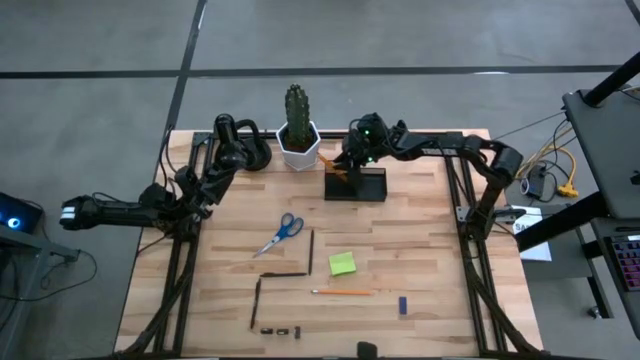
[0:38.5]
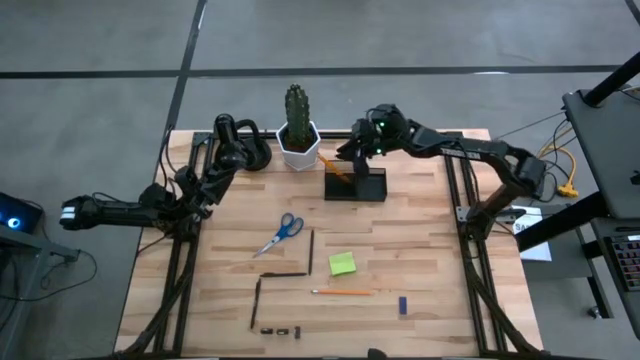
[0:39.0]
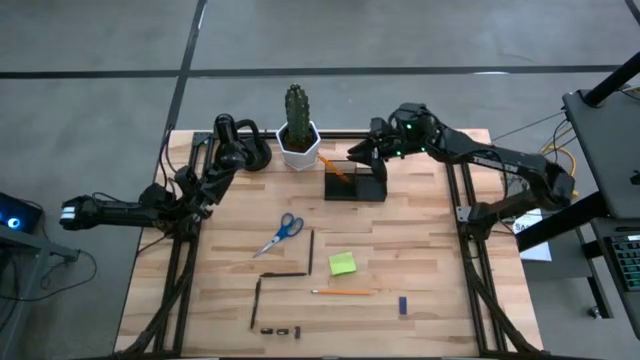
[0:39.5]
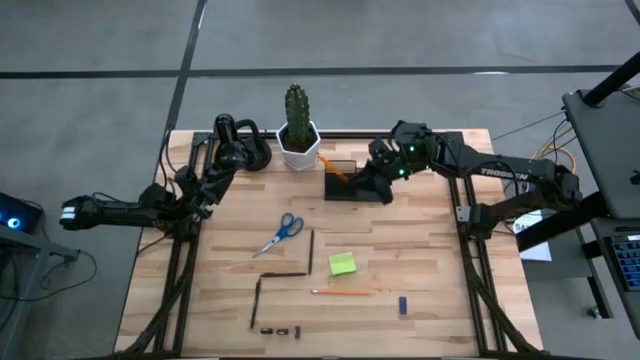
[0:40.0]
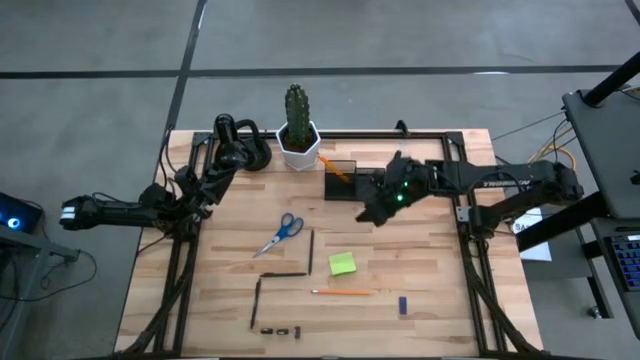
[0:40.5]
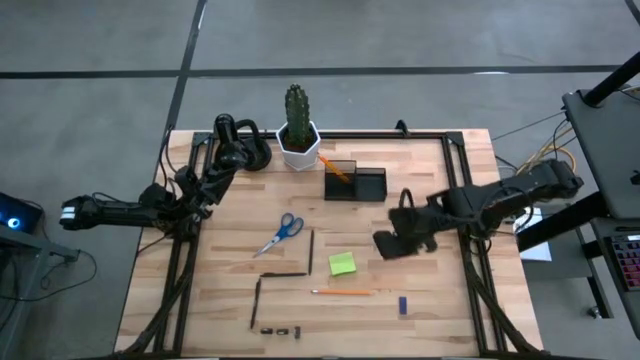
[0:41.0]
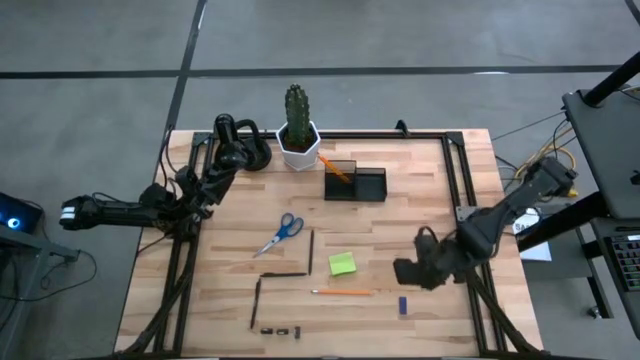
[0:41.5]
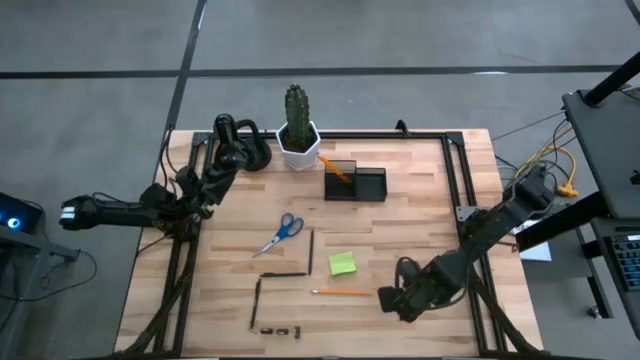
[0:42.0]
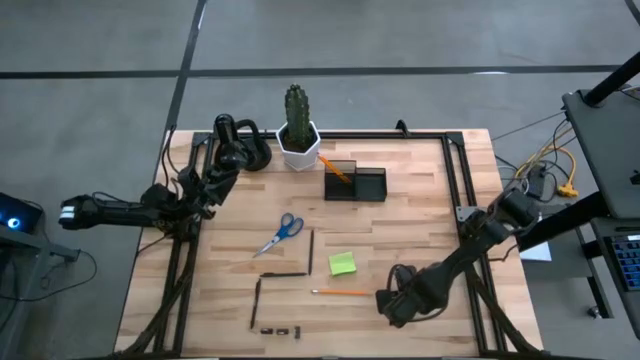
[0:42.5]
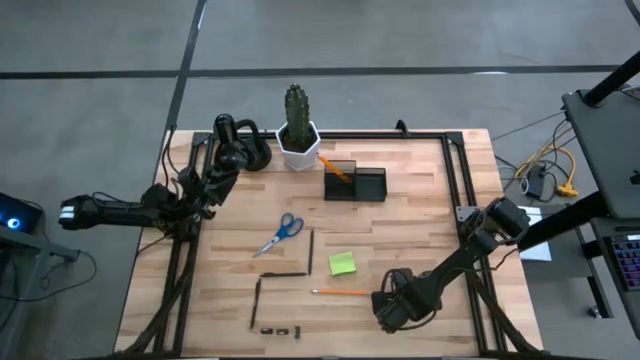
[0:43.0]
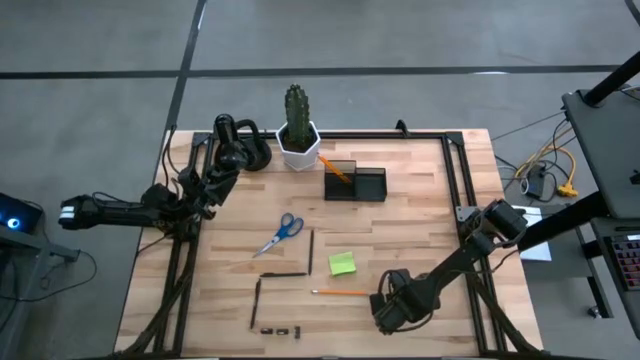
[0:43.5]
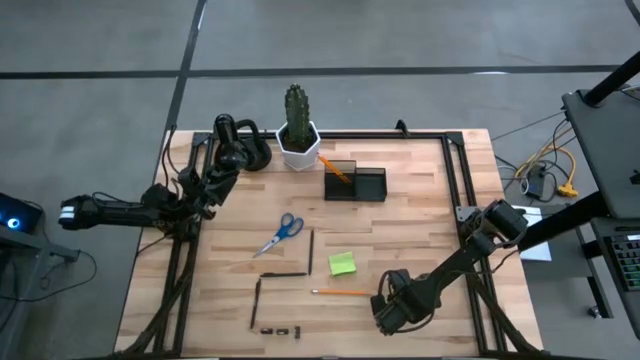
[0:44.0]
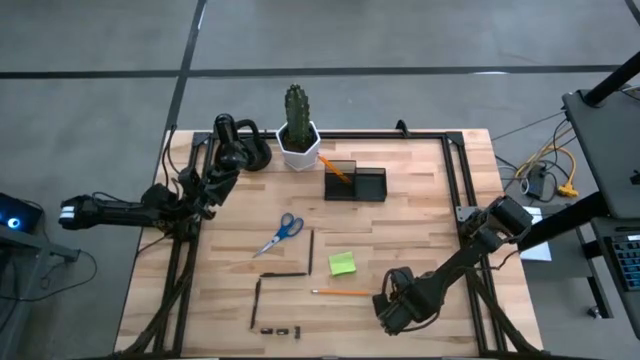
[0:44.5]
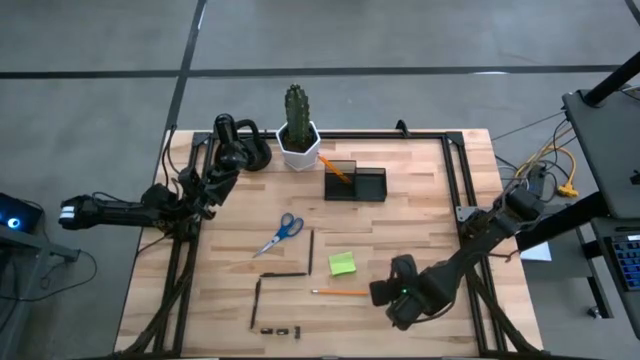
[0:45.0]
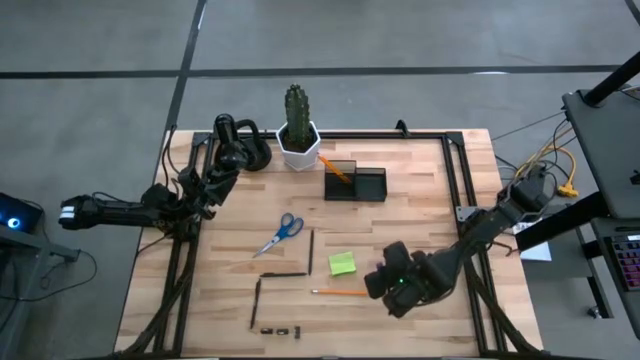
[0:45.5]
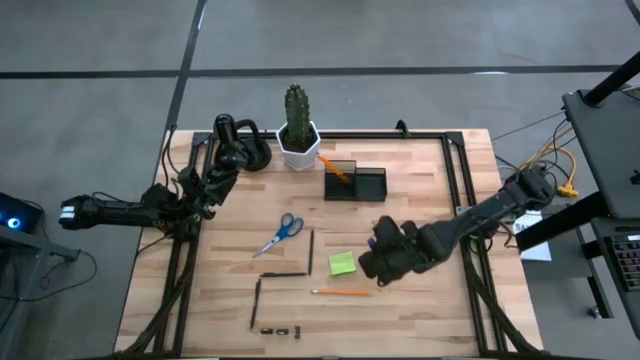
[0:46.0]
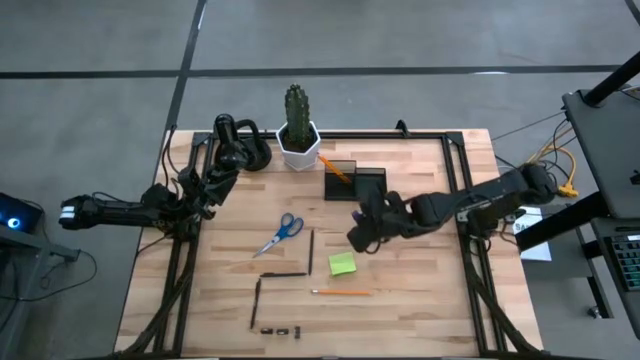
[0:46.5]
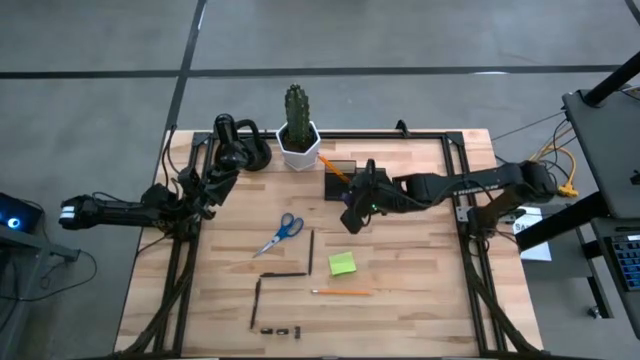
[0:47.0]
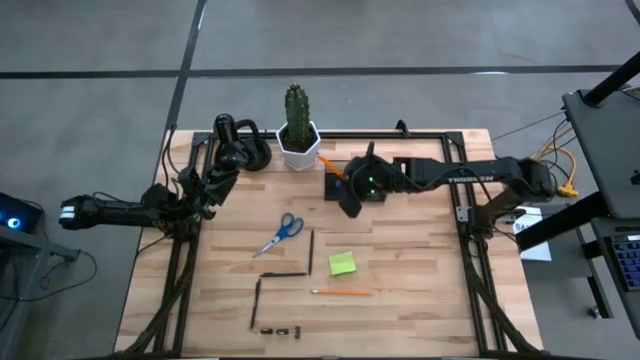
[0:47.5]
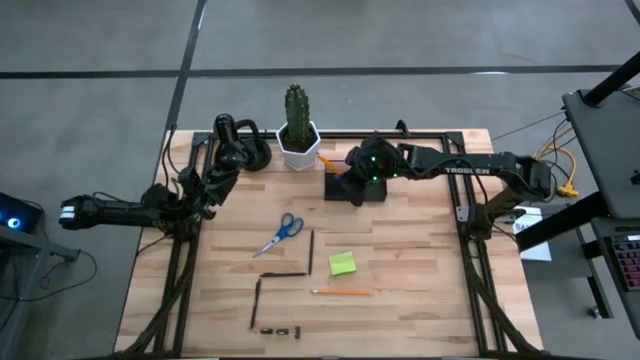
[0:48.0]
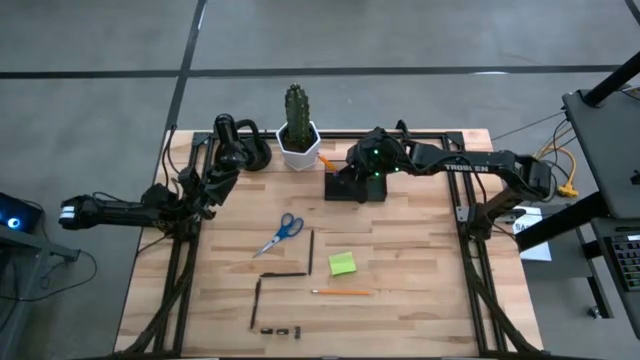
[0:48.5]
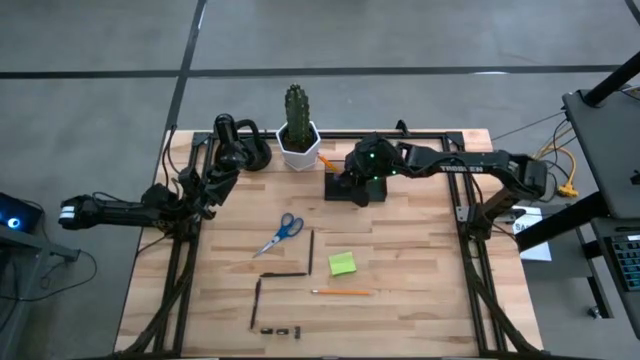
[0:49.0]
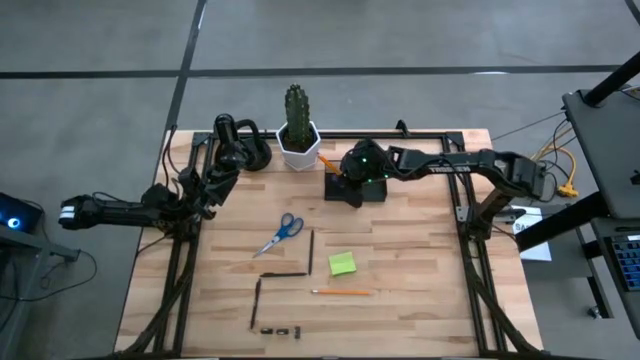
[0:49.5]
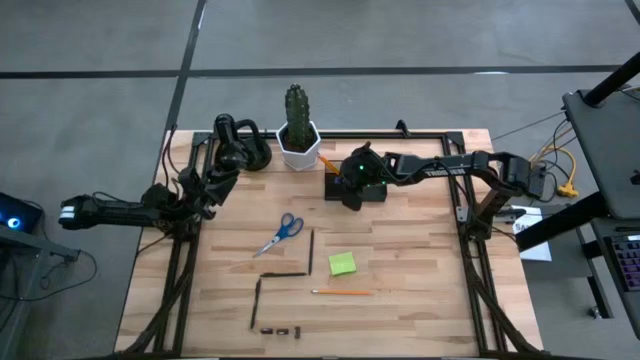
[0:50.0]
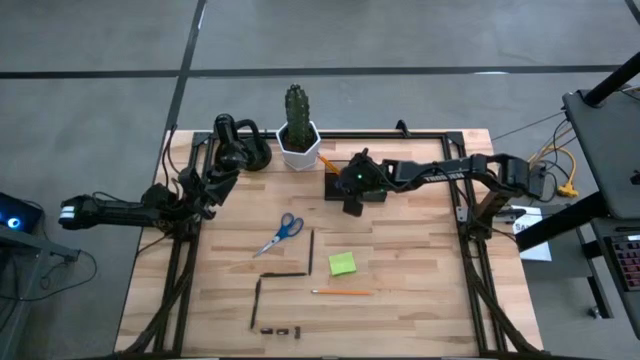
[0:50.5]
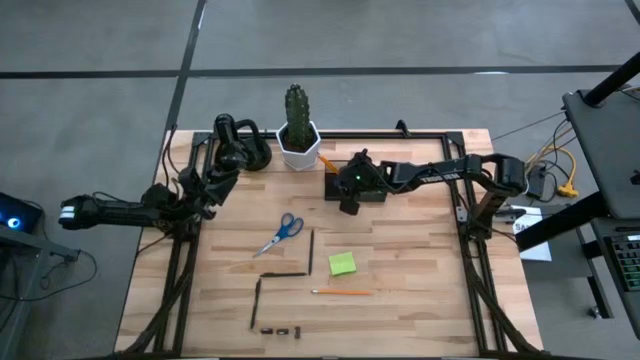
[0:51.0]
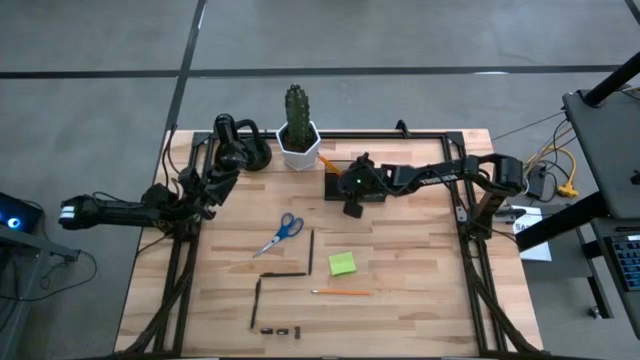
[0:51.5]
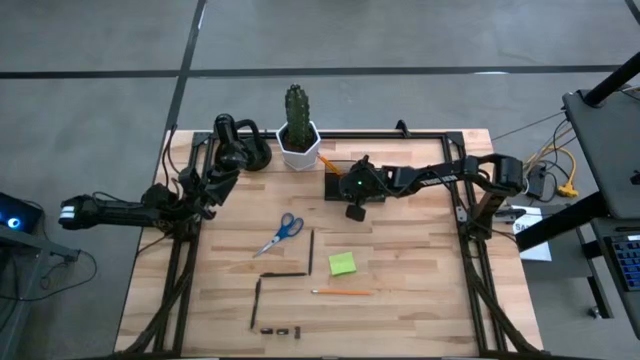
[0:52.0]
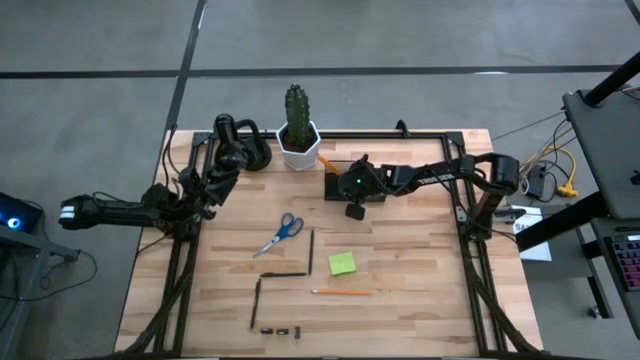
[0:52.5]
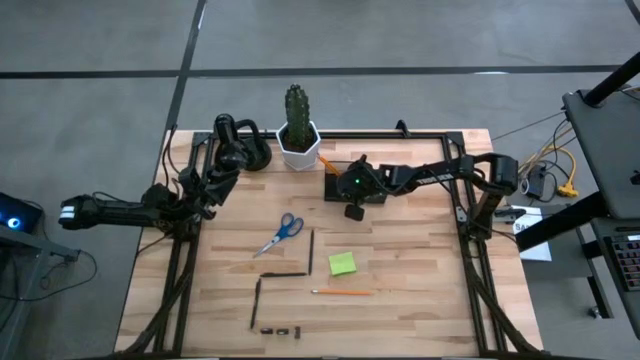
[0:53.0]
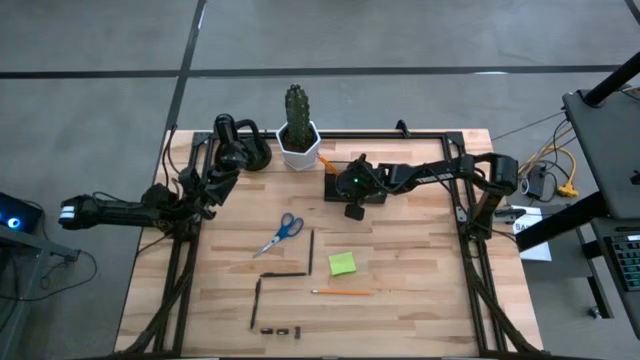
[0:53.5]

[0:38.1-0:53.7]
Task: Pick and place office supplies into organizer
Put the eraser into the bottom section of the desk organizer

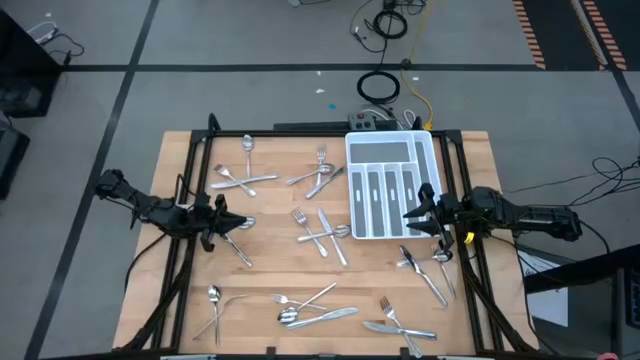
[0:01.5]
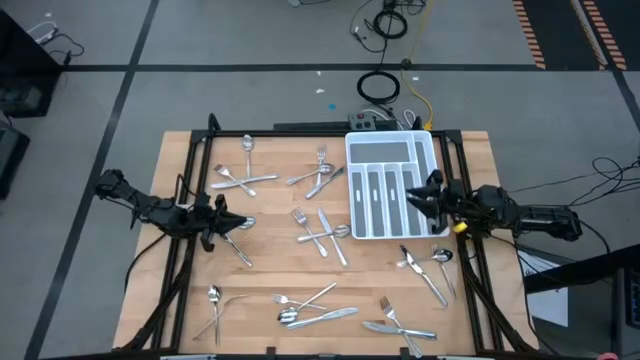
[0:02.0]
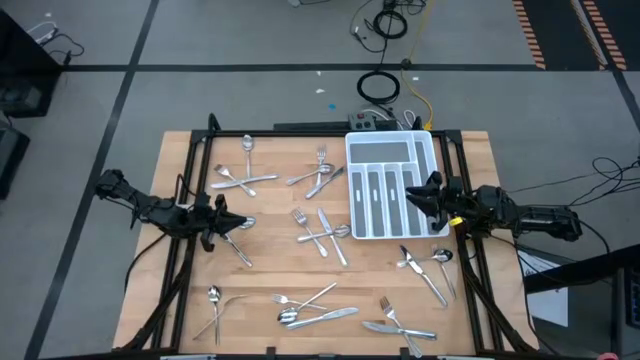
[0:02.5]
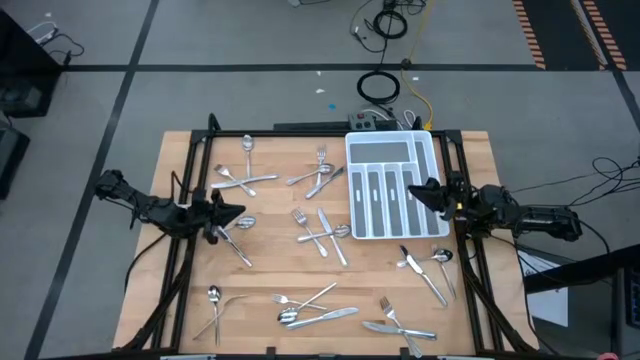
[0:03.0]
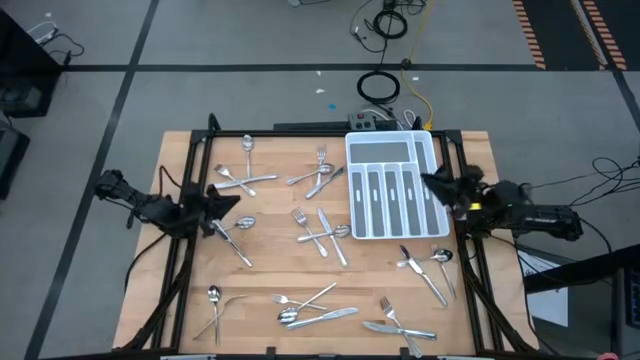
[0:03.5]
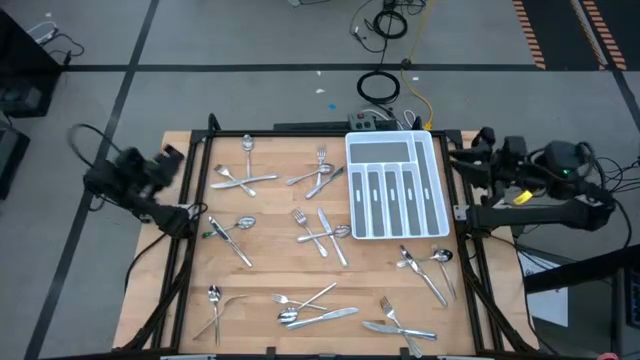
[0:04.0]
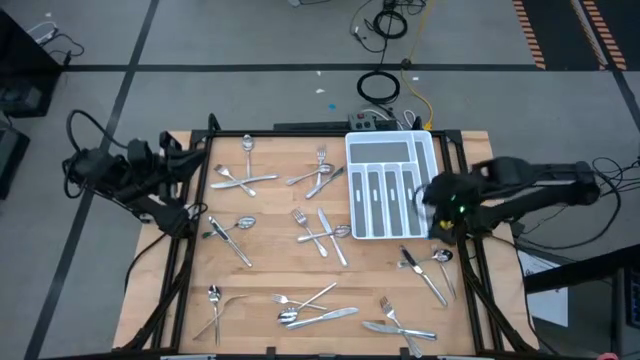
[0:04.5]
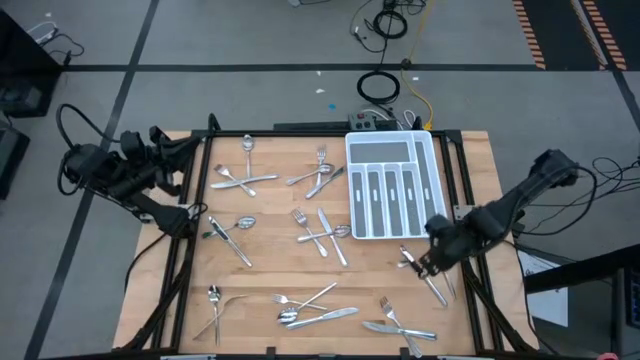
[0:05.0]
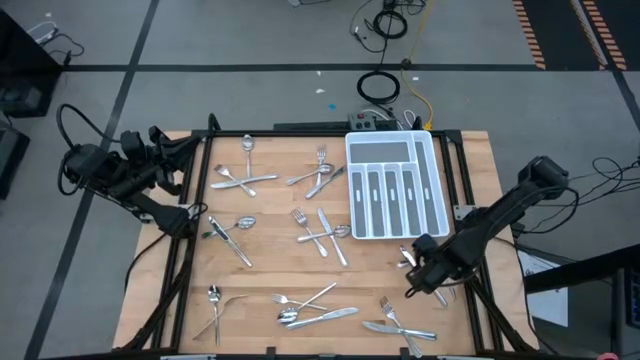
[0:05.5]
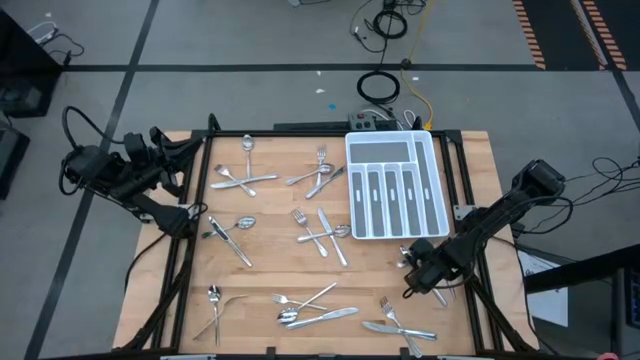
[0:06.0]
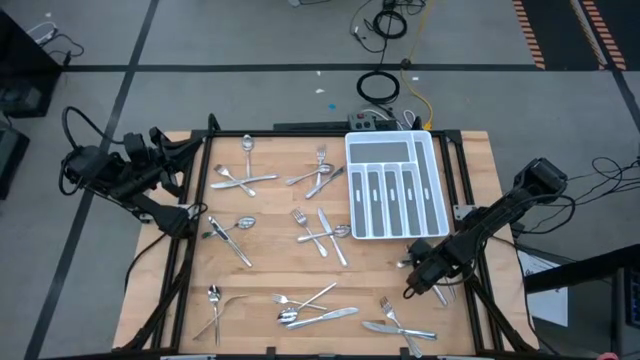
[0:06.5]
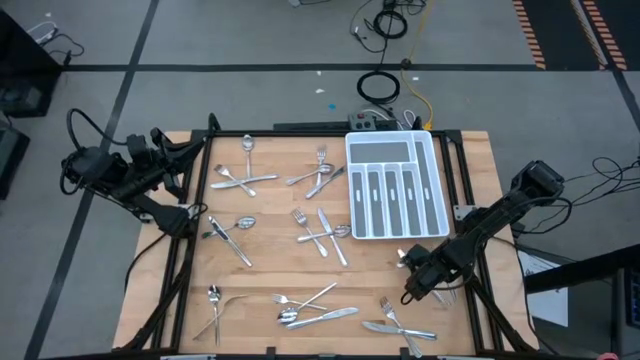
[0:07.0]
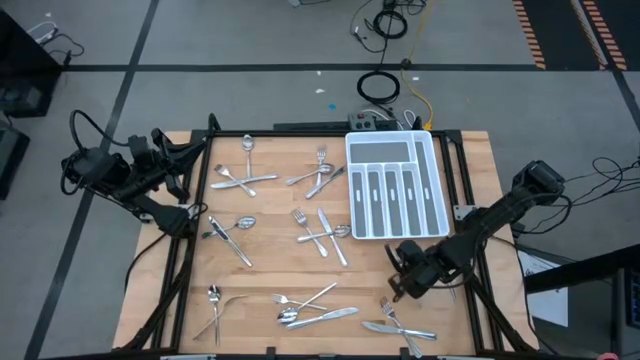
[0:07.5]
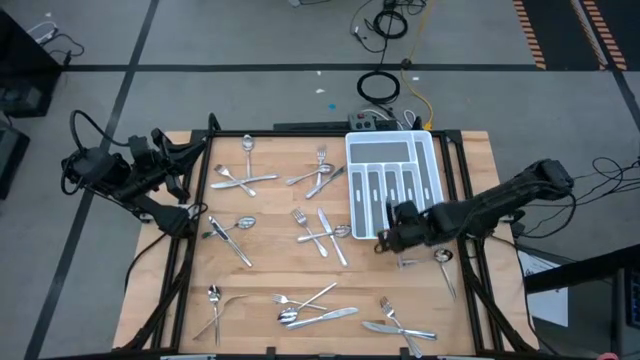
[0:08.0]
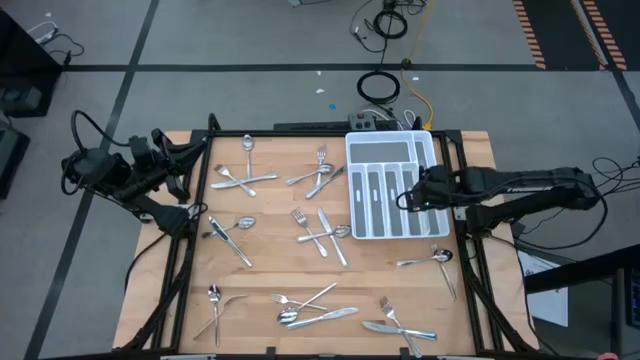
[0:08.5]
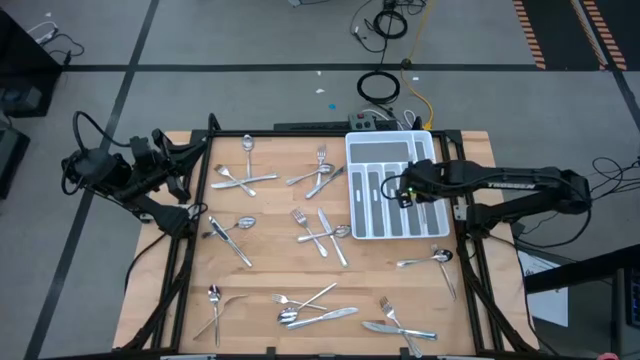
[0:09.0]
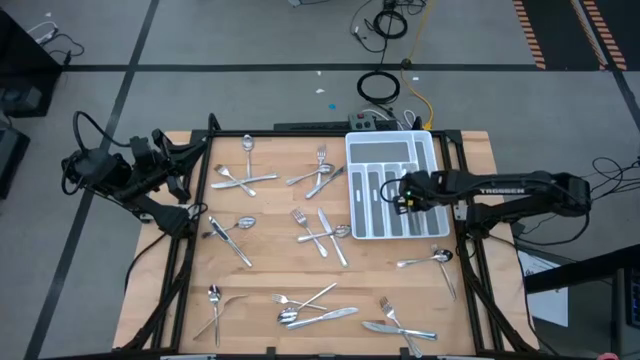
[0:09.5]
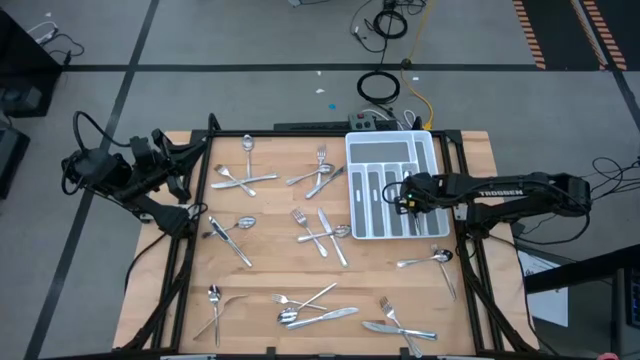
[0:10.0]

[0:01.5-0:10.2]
Task: Sort silverware
Put the silver knife into the white silverware tray
